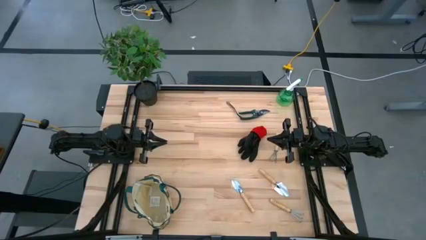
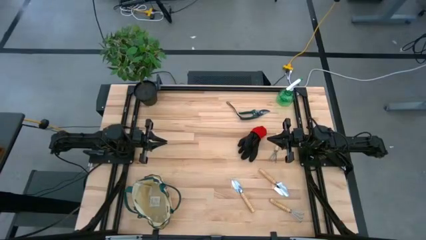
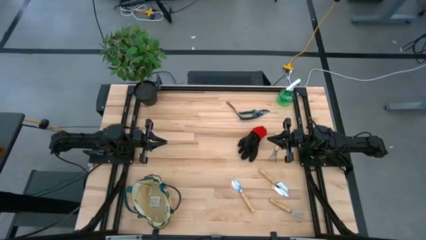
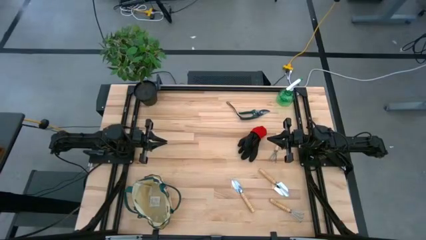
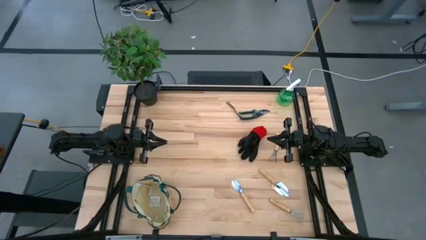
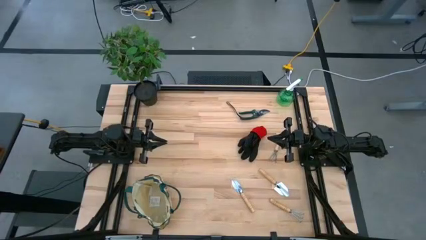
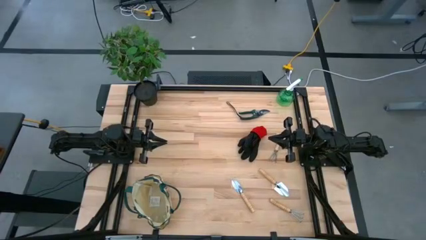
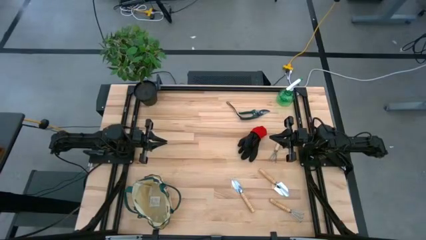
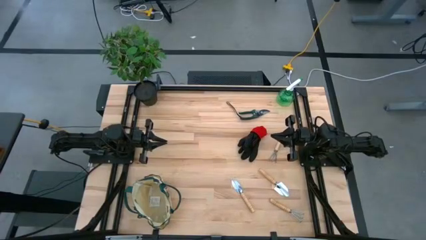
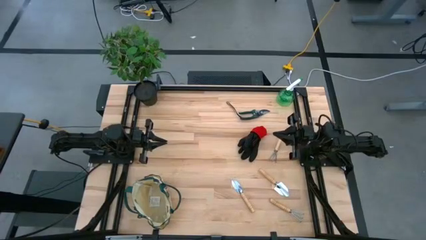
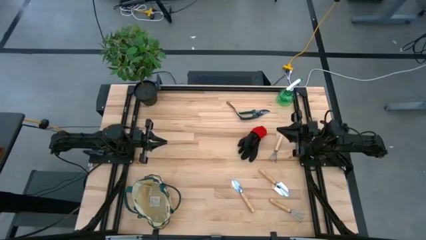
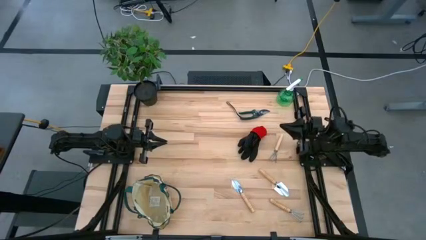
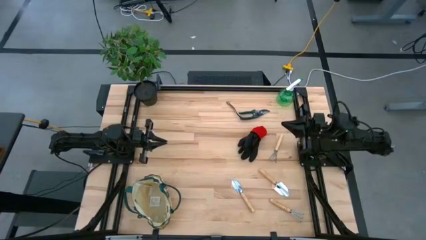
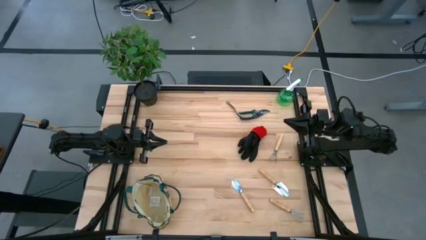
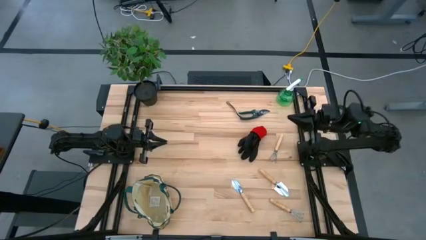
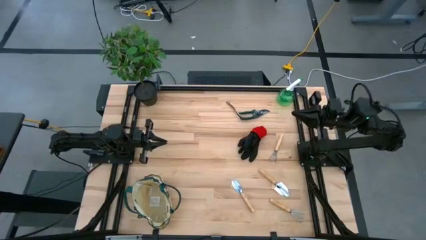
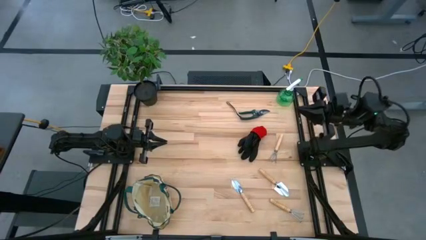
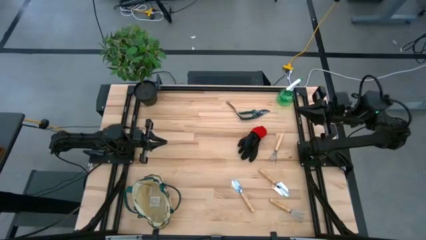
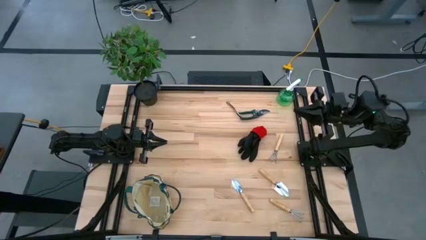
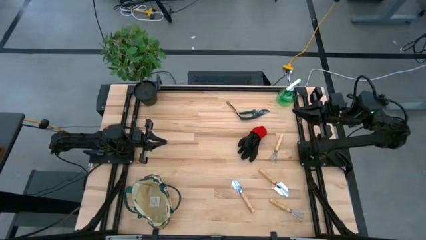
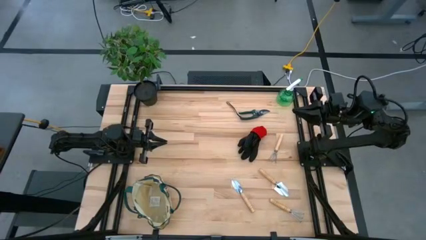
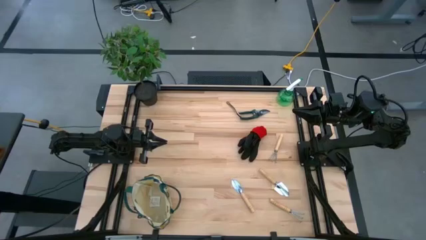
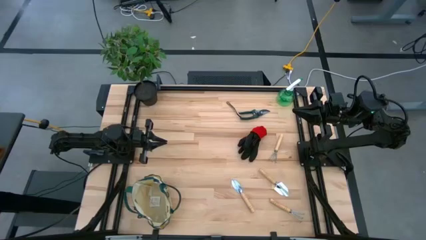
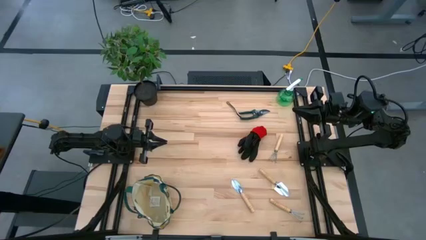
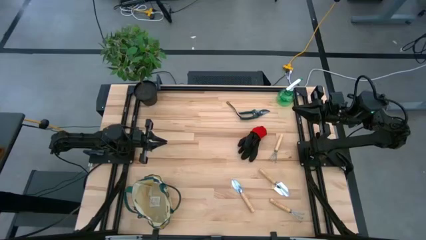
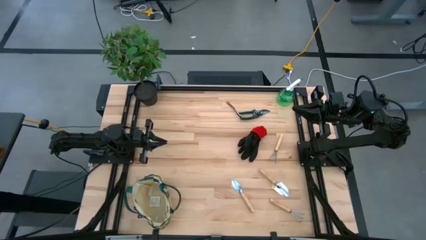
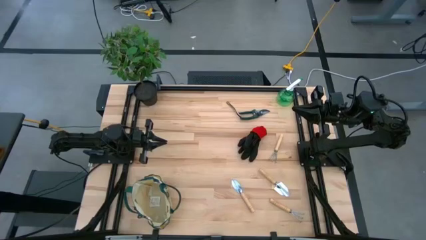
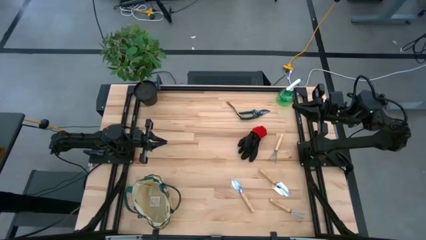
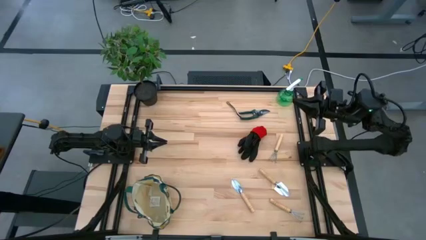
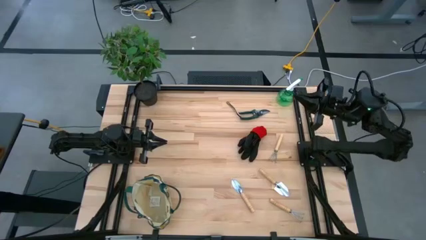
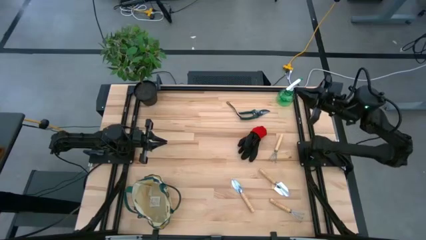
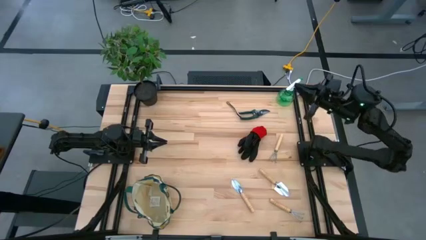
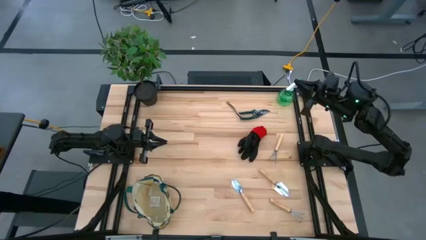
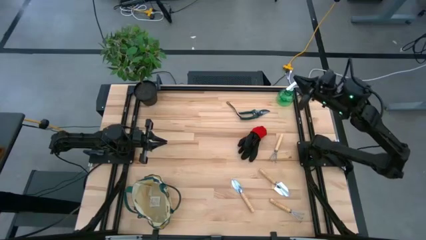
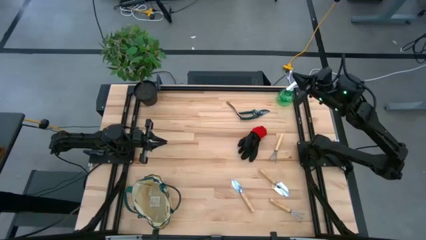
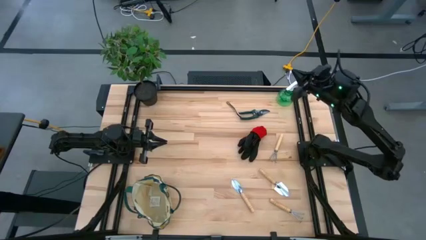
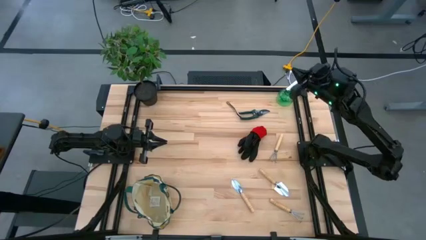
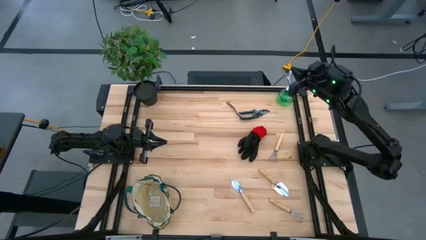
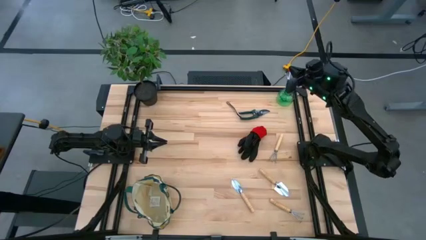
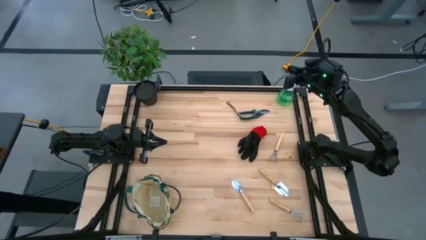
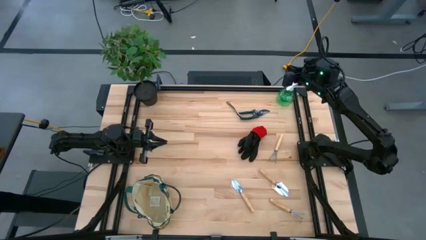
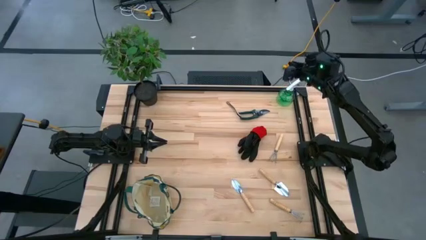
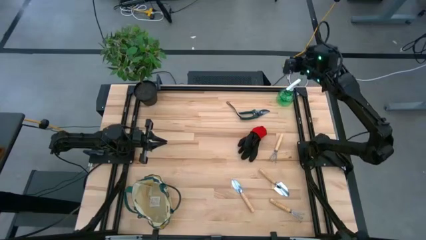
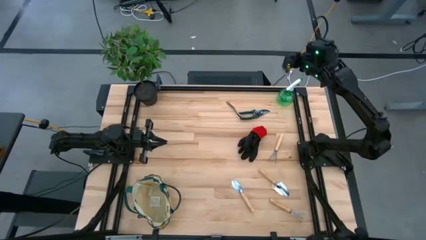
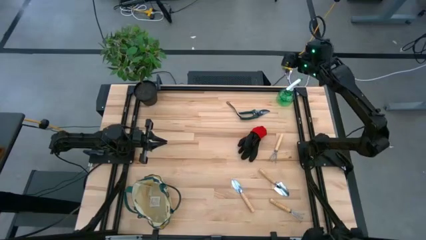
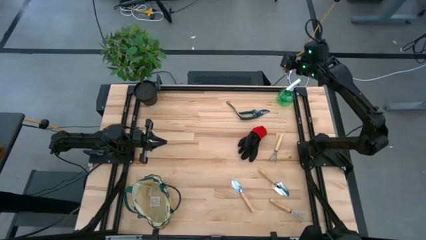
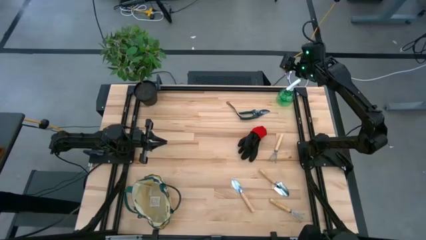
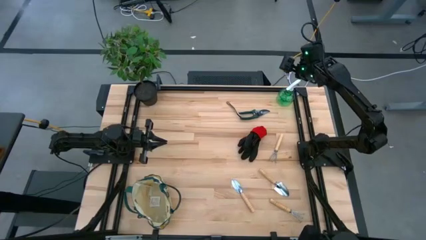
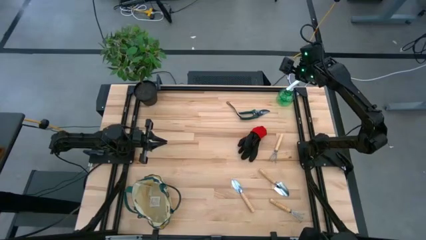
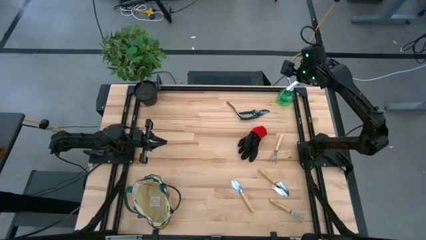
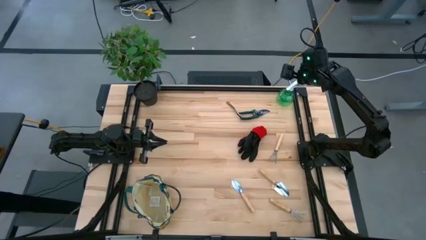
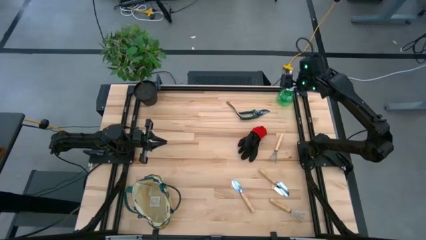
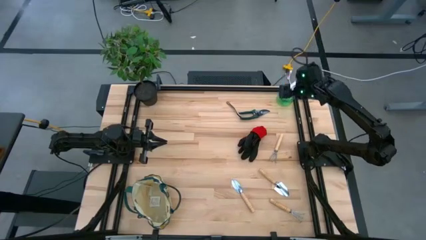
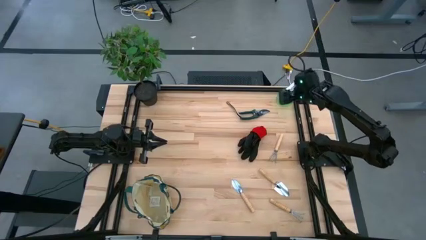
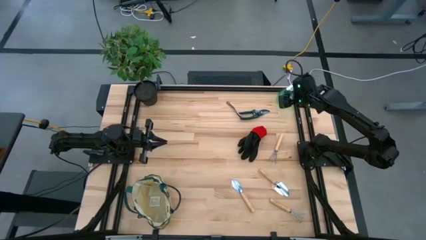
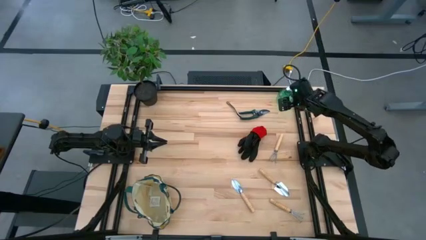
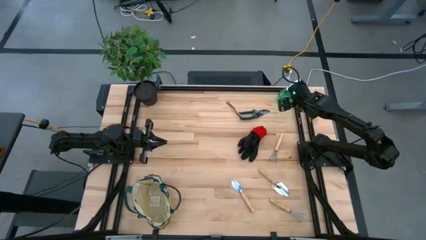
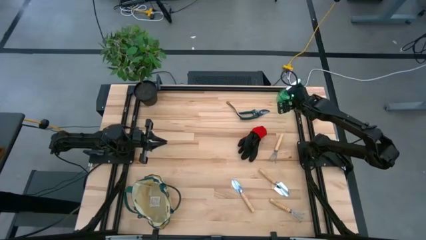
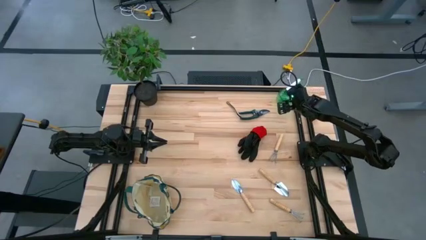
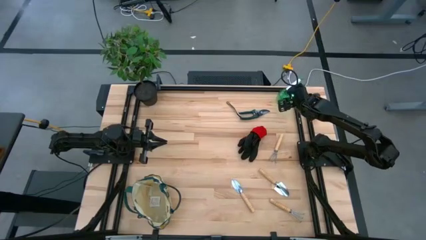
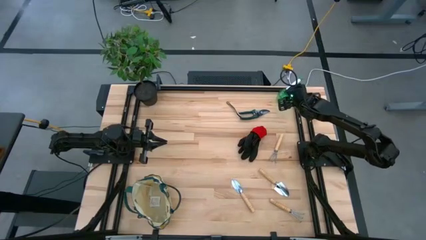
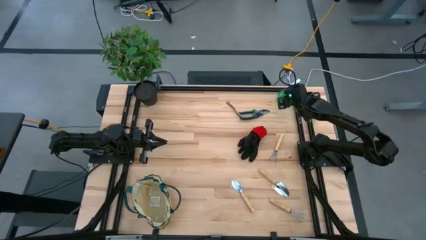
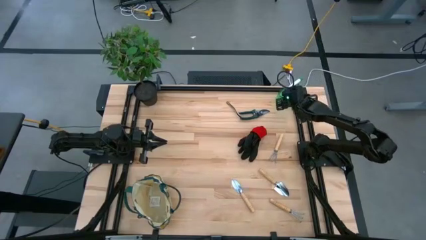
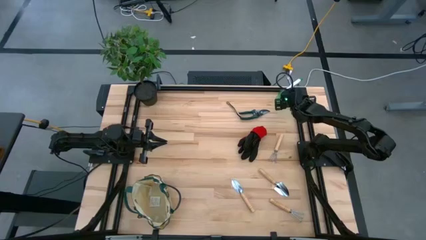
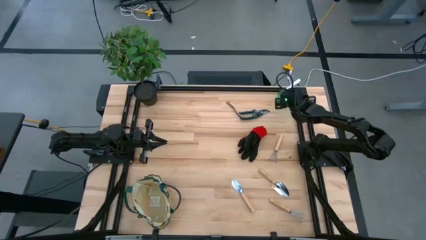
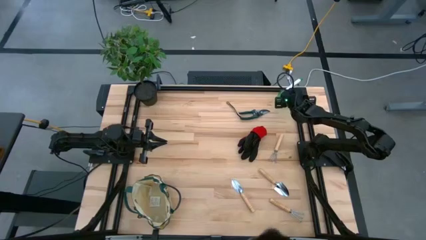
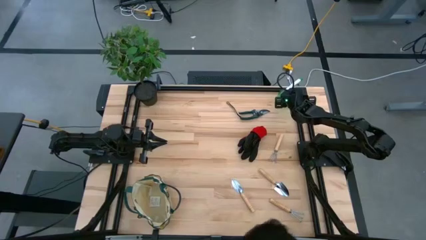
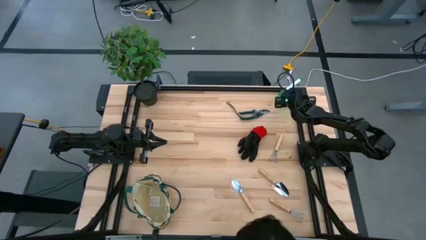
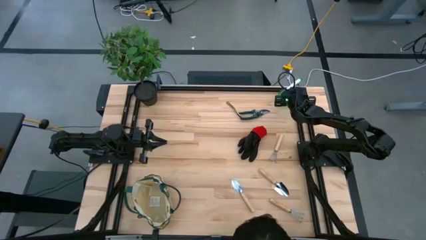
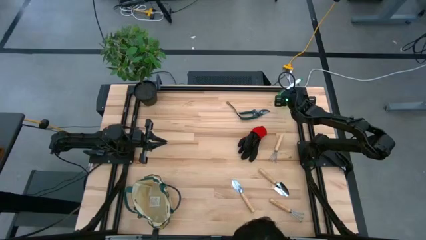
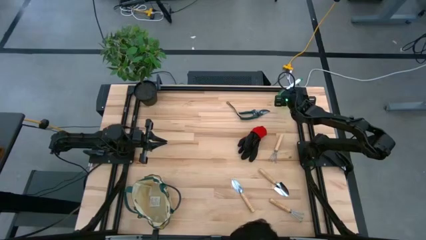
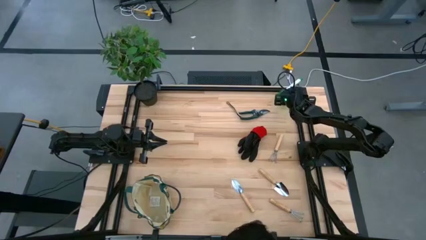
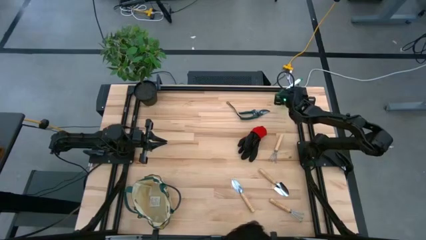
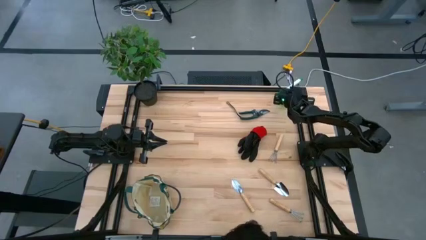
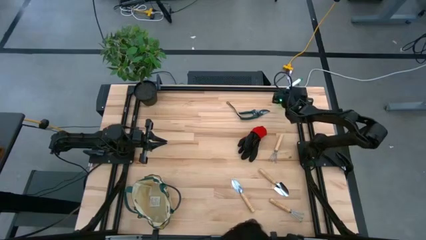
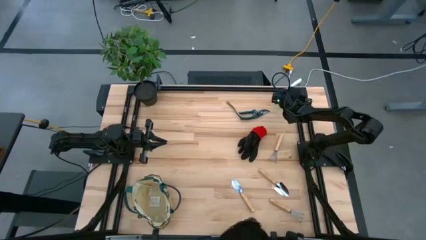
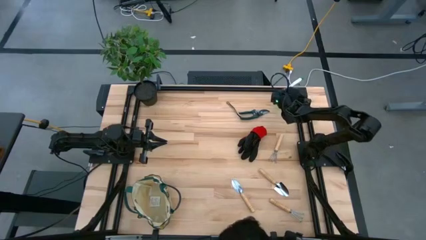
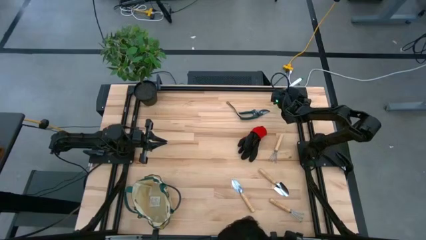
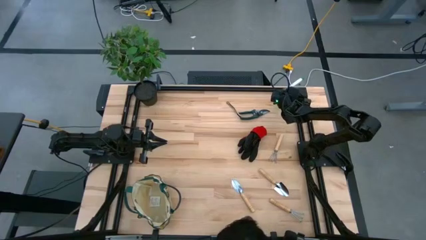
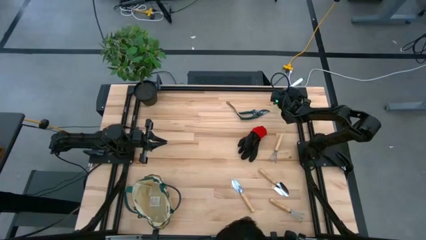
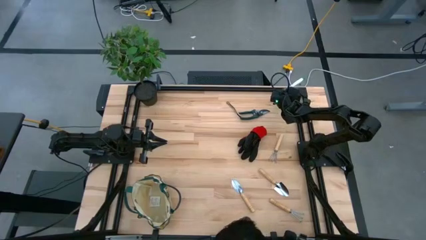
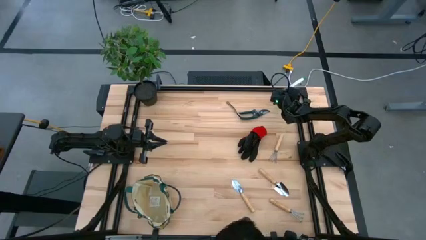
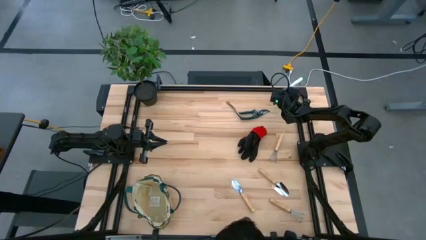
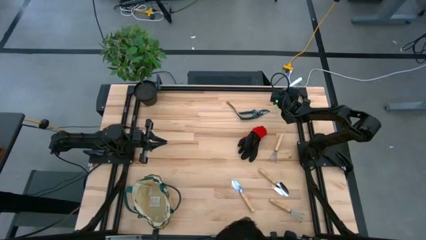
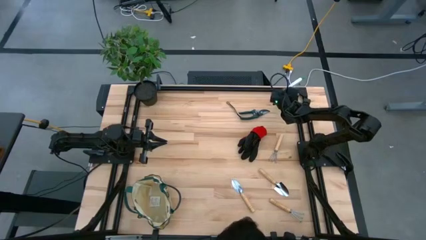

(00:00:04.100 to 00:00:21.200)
Task: Pick & Place Garden tools in Gardening bag
Put the spray bottle into the gardening bag
